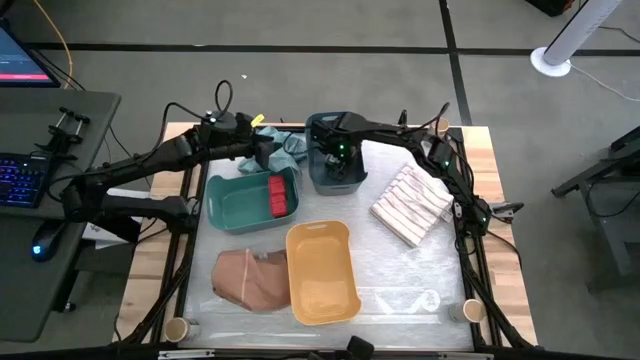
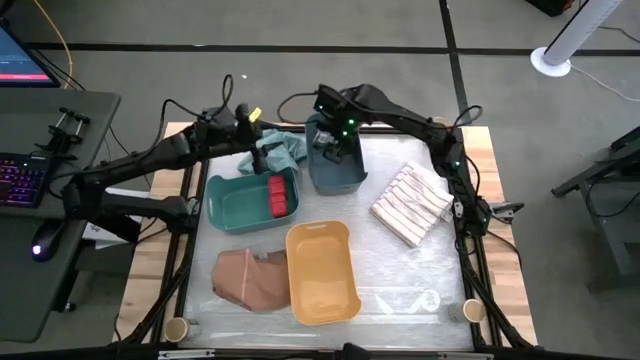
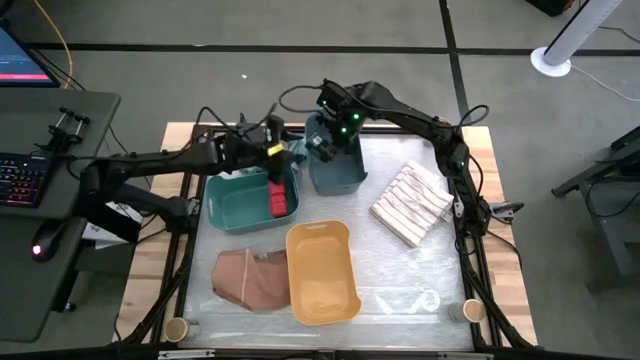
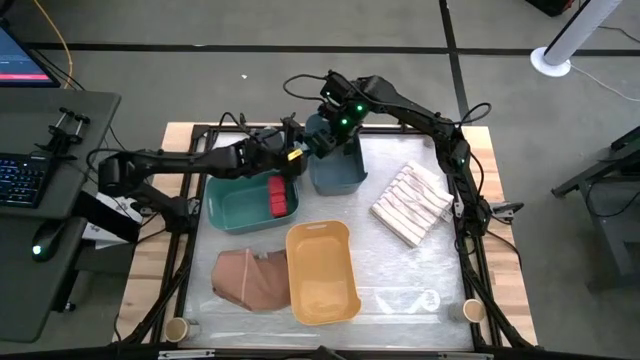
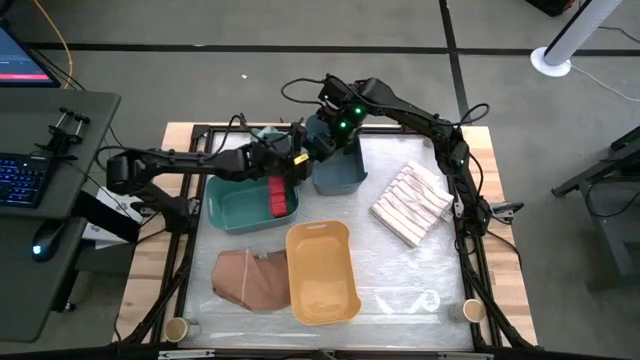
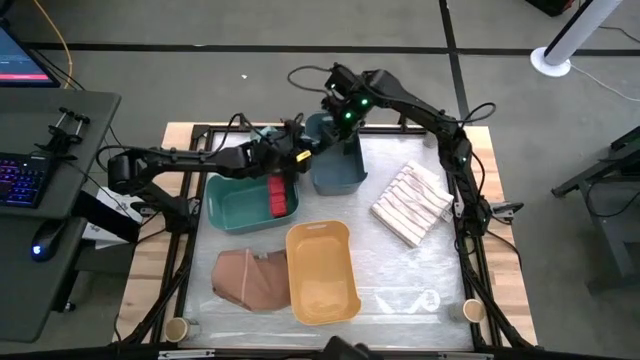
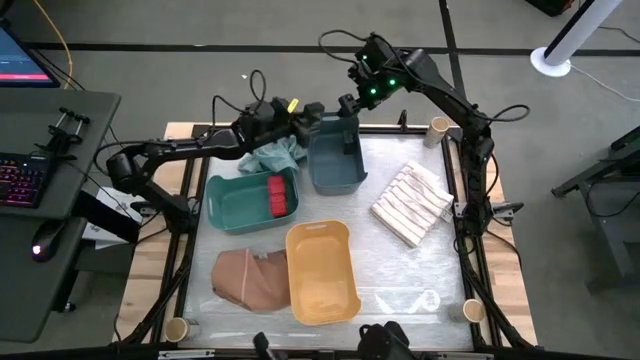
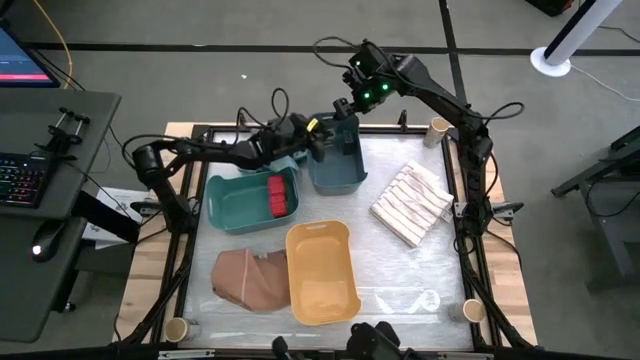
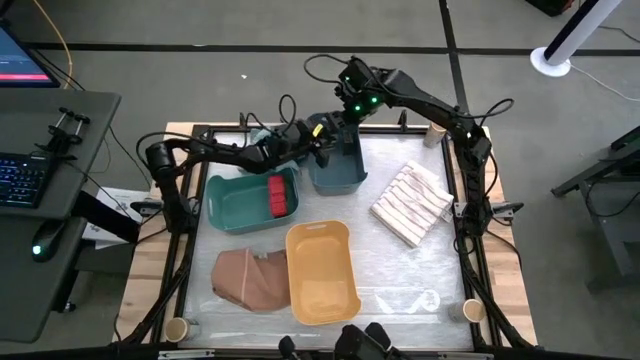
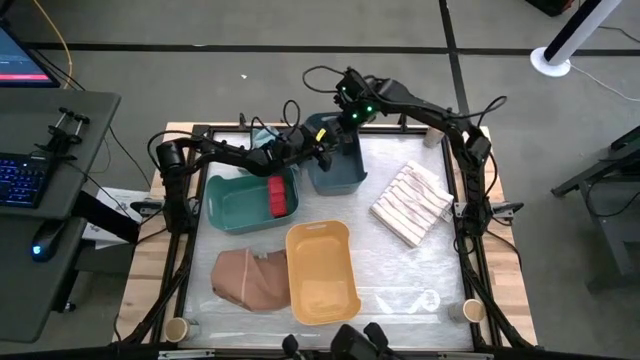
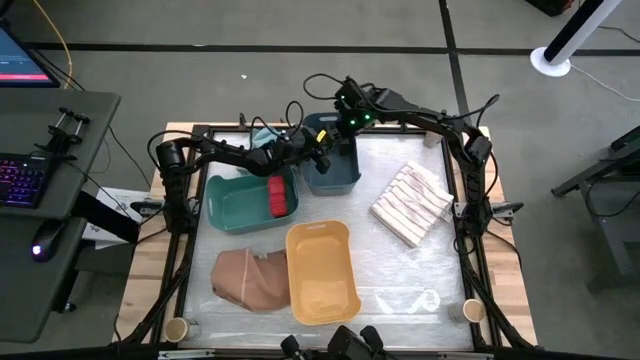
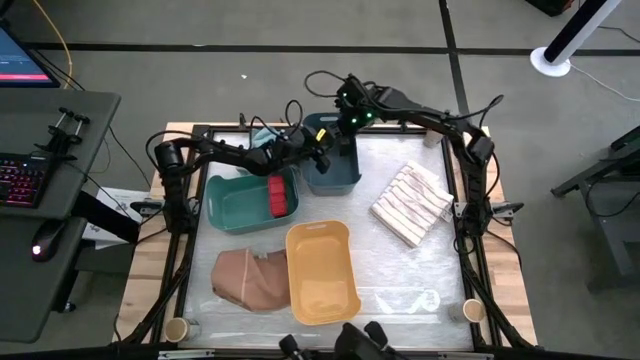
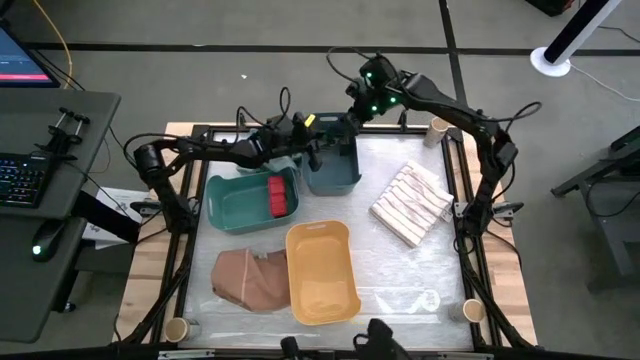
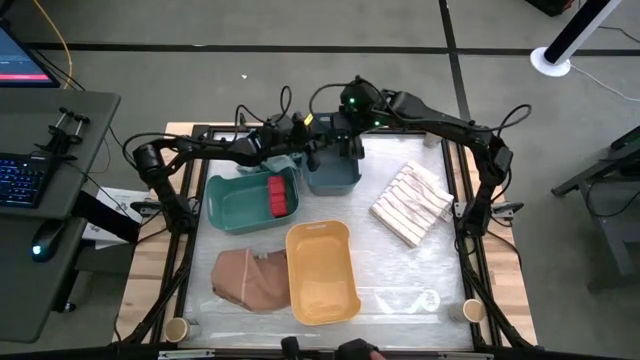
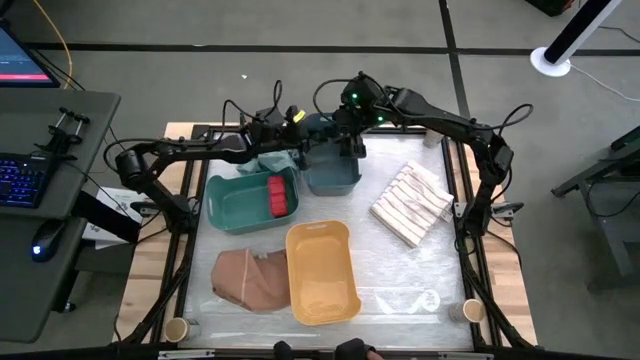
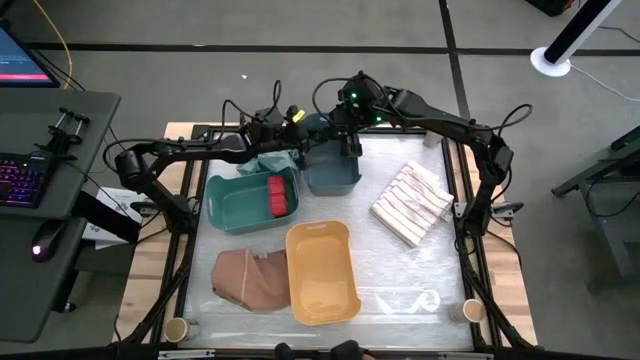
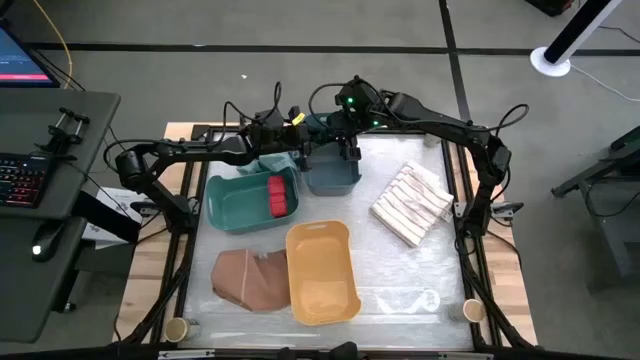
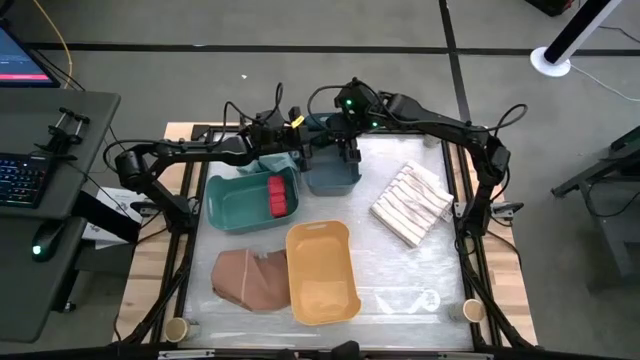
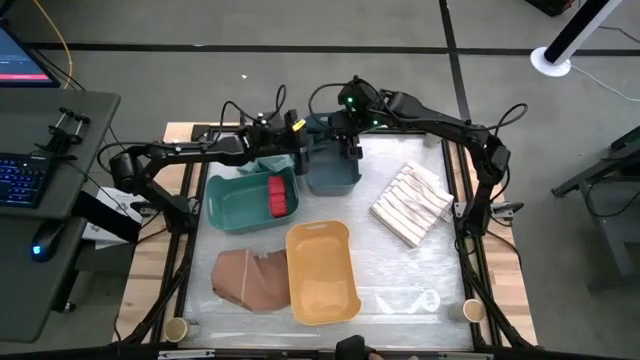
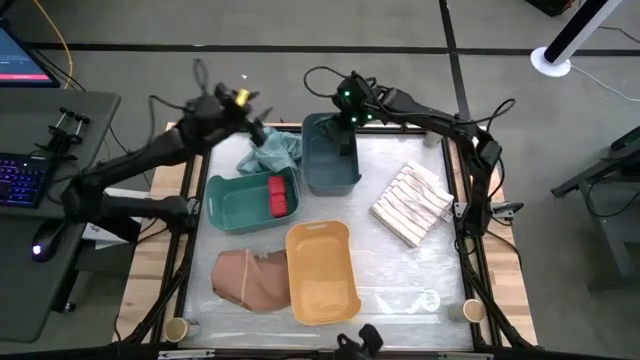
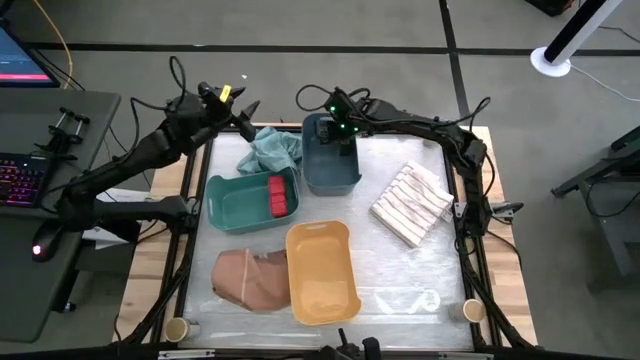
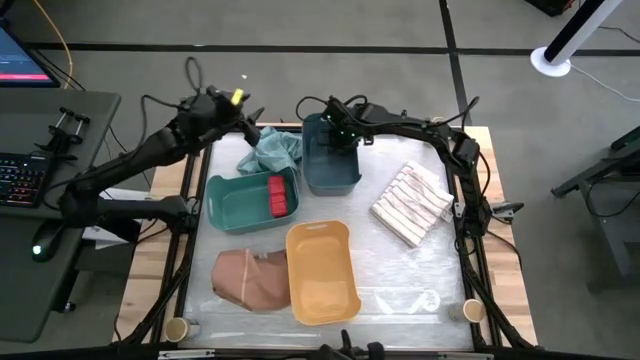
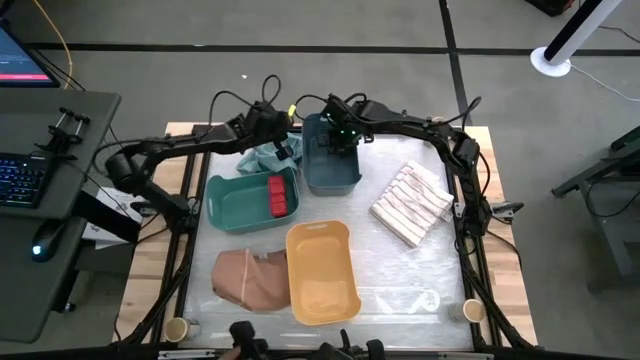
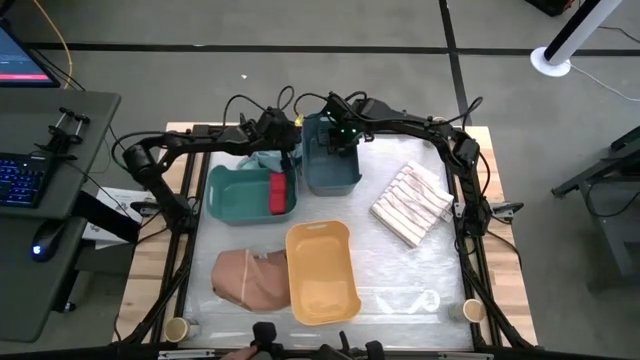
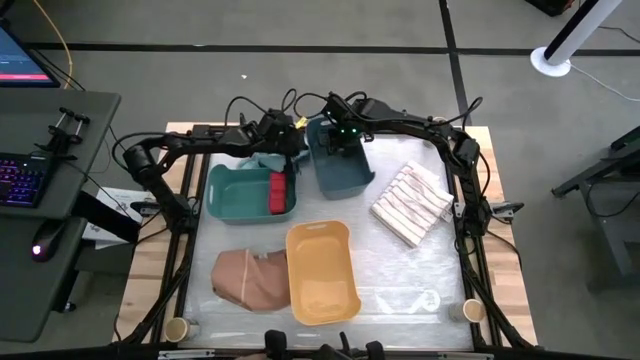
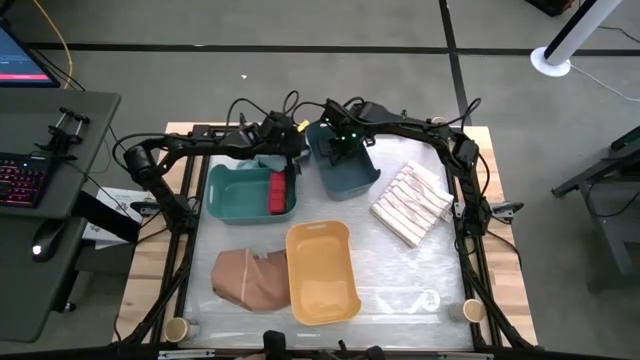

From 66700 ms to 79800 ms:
Task: Sort spices by type
Put the black seasoning can into the blue bin

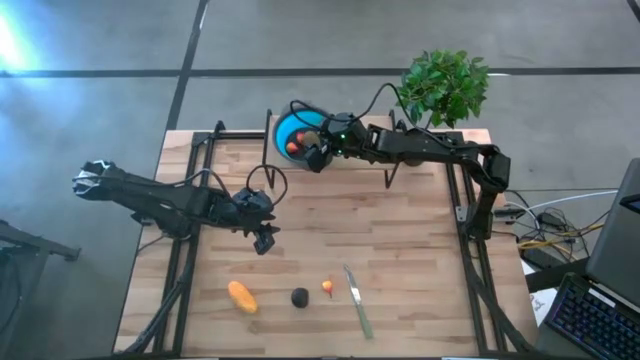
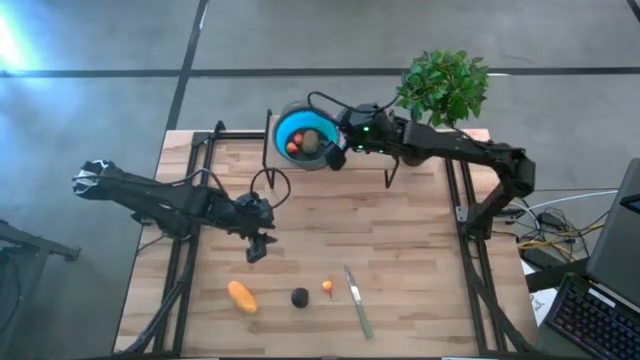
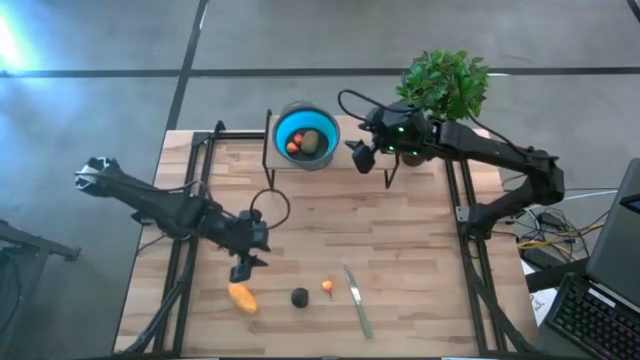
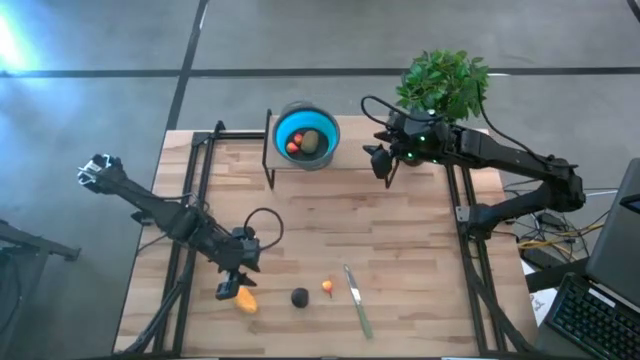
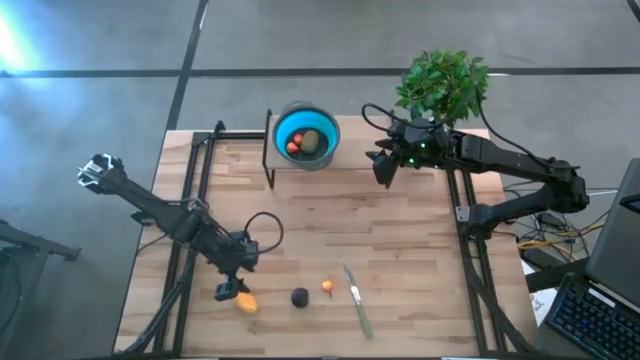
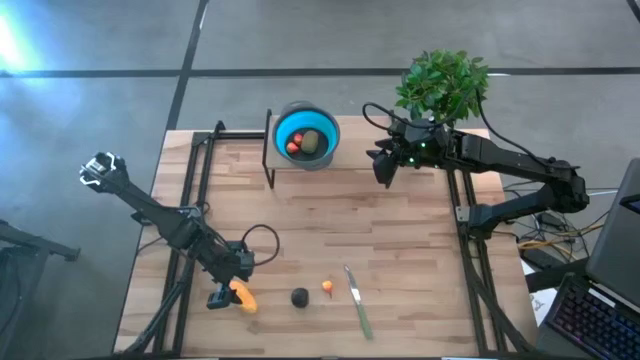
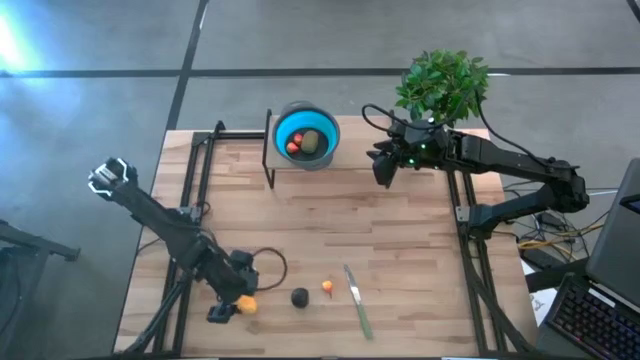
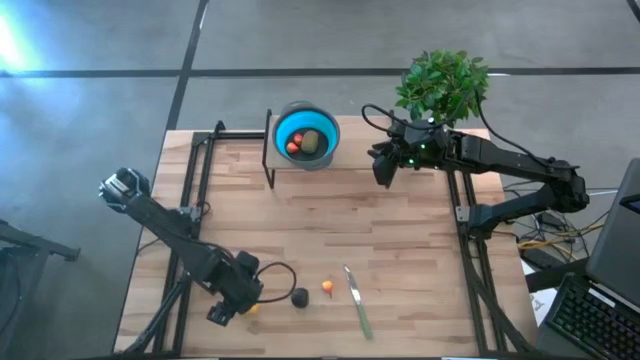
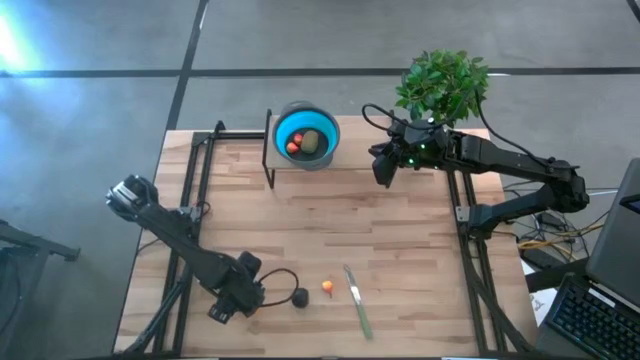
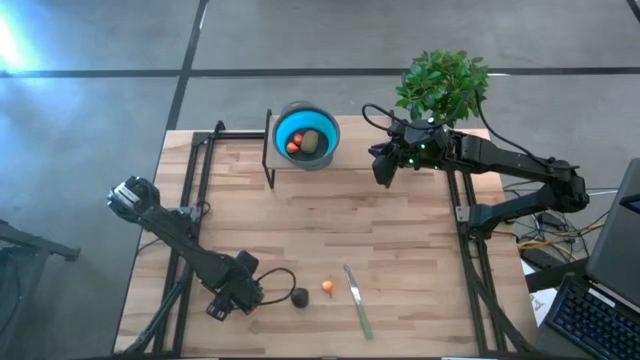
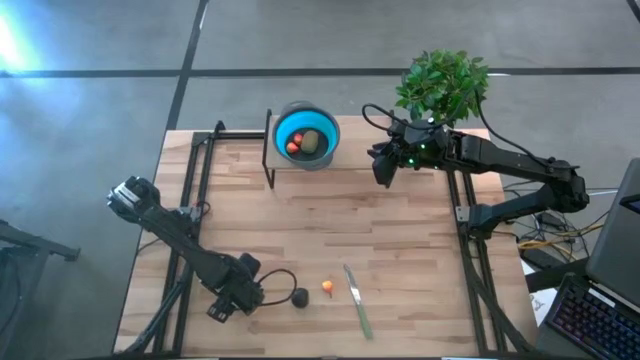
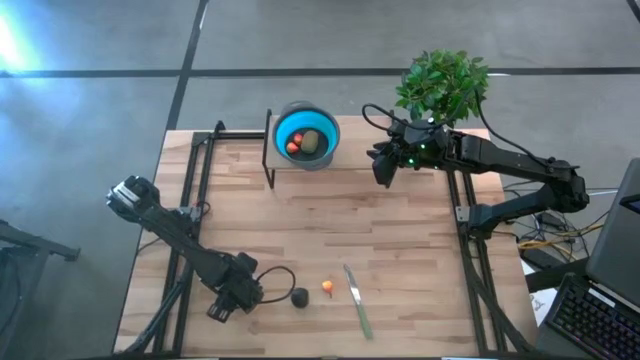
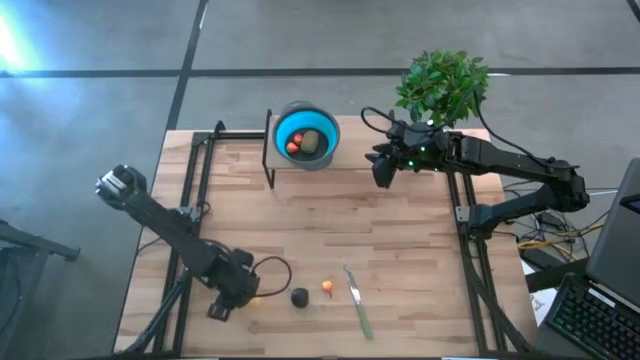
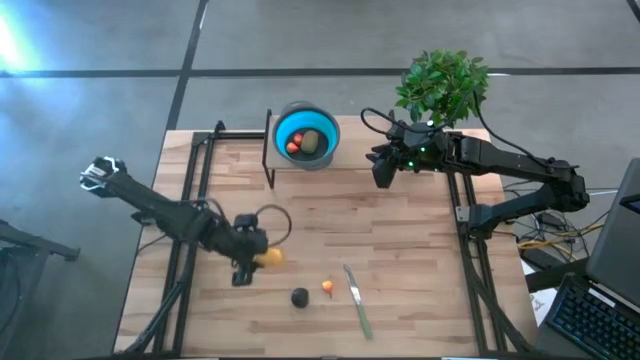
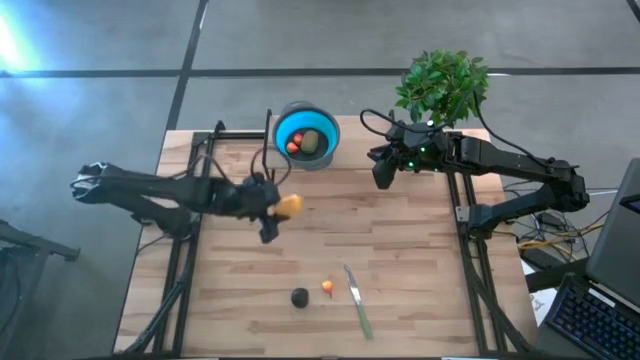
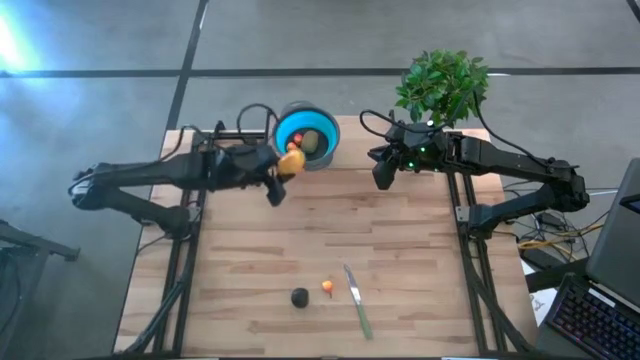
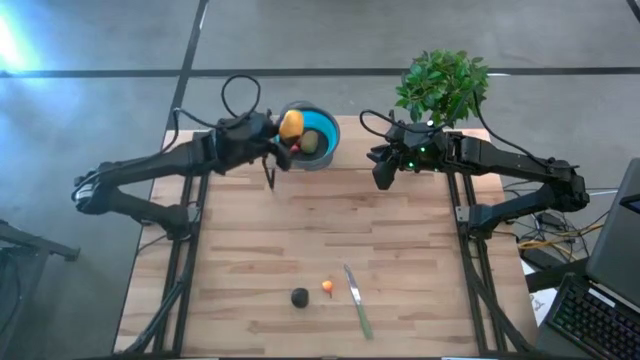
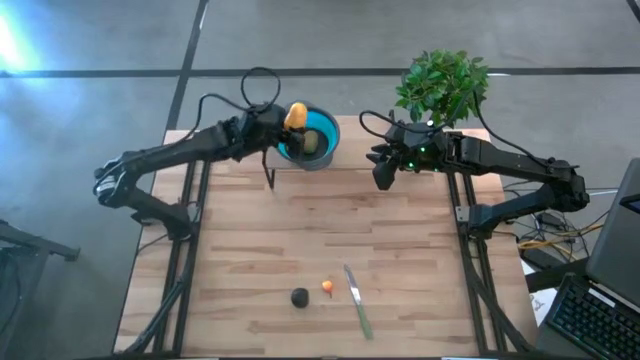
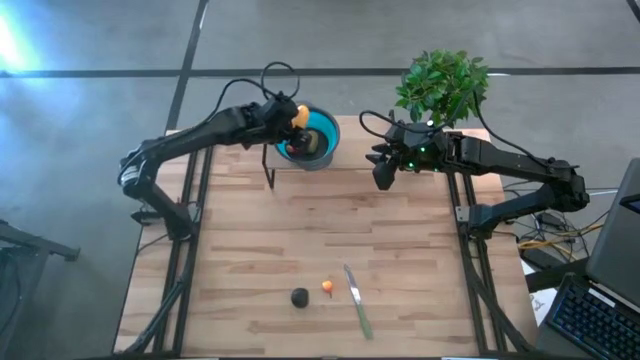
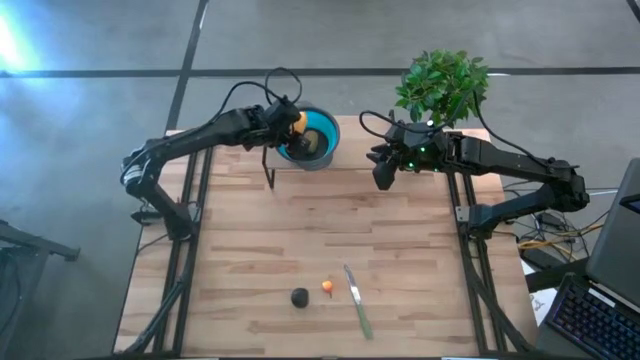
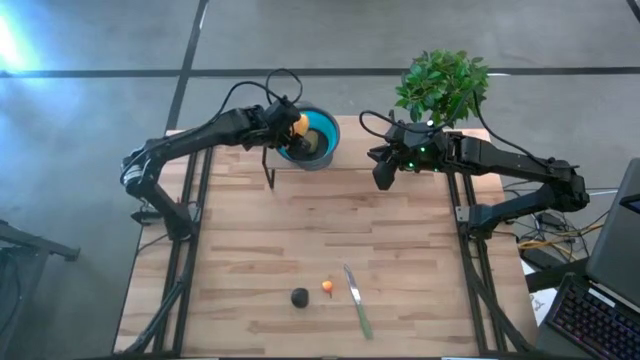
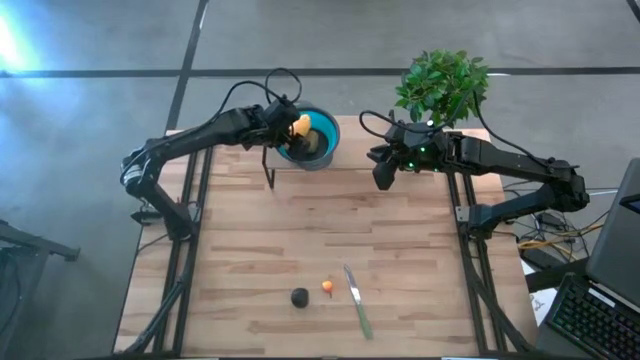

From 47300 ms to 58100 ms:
Task: Pick & Place Fruit
Put the yellow mango into the blue strainer bowl
